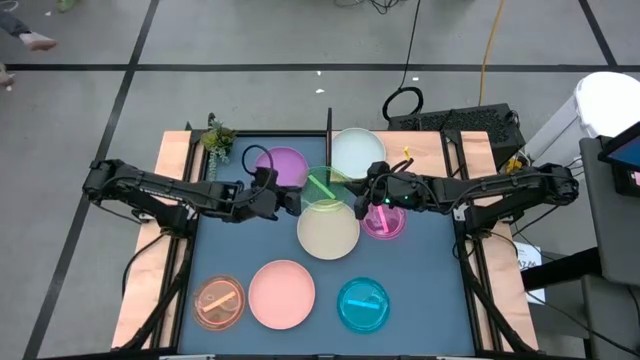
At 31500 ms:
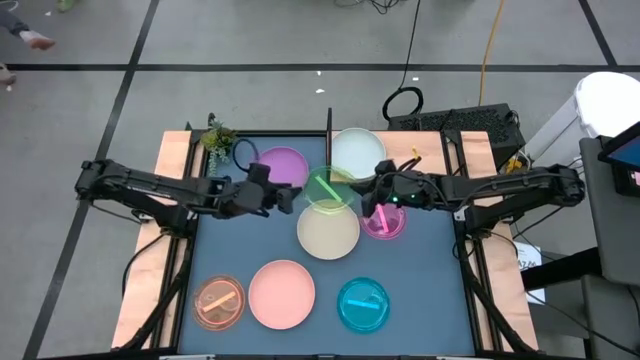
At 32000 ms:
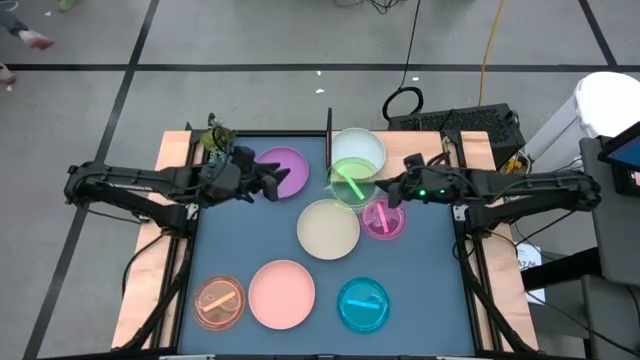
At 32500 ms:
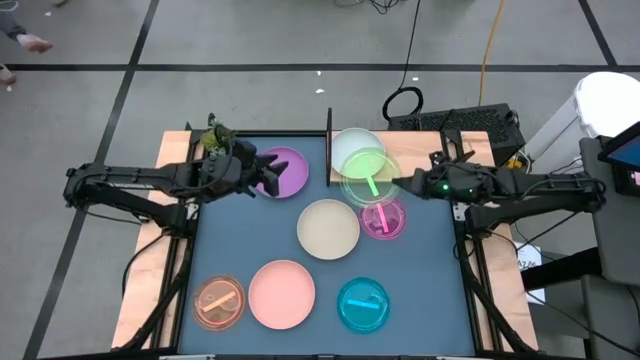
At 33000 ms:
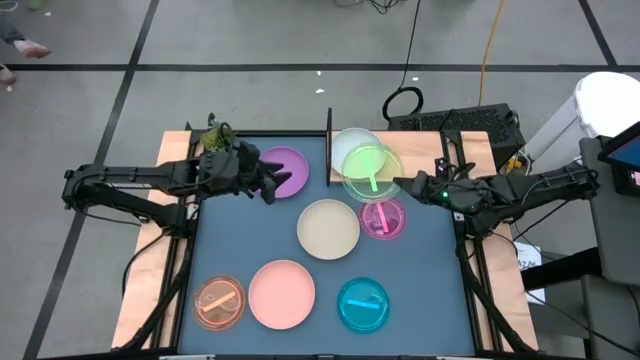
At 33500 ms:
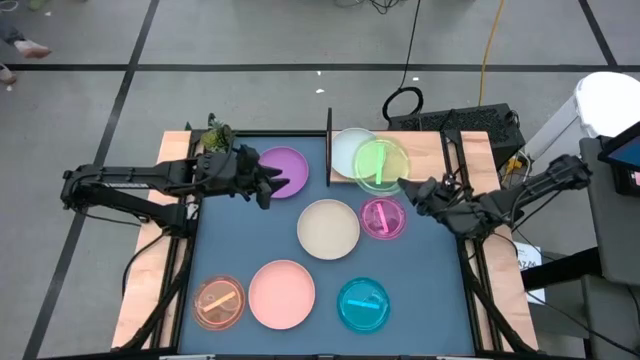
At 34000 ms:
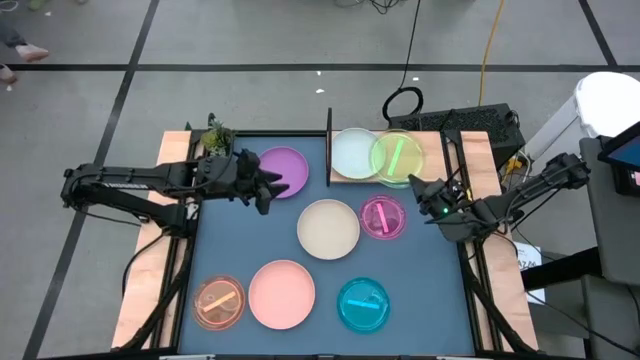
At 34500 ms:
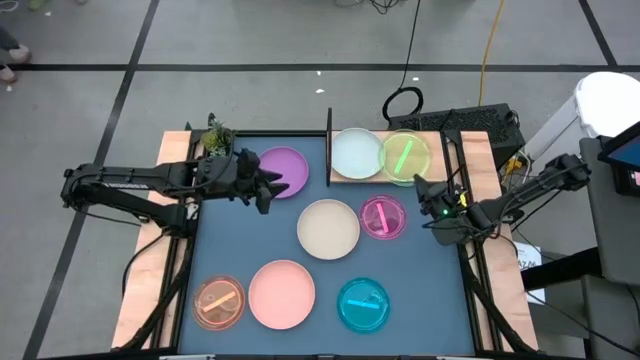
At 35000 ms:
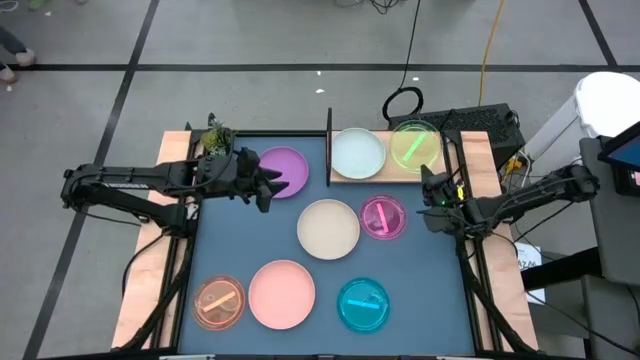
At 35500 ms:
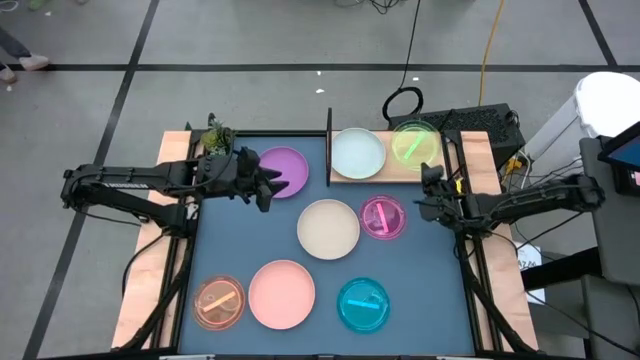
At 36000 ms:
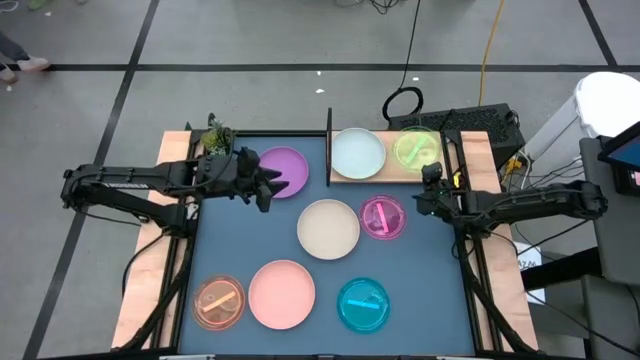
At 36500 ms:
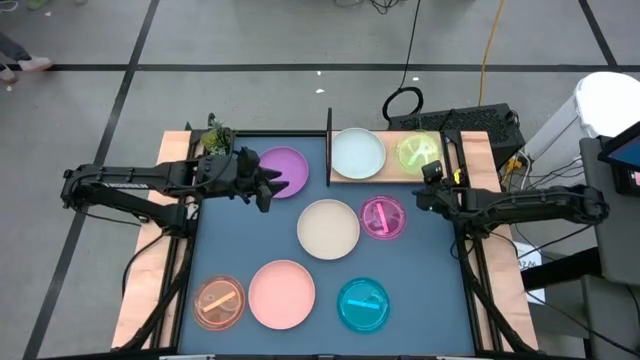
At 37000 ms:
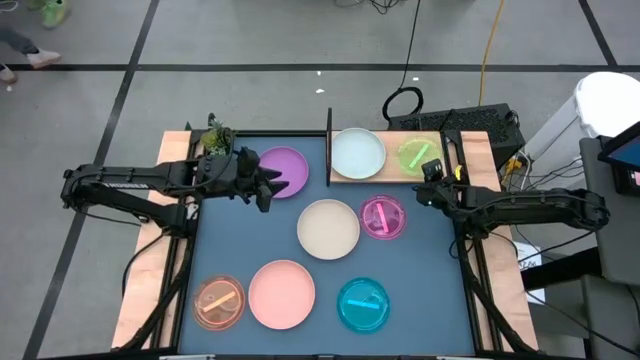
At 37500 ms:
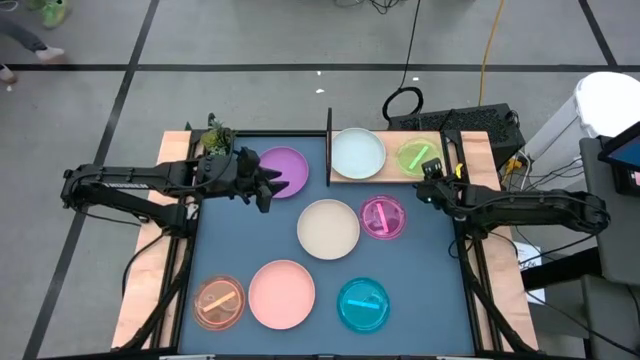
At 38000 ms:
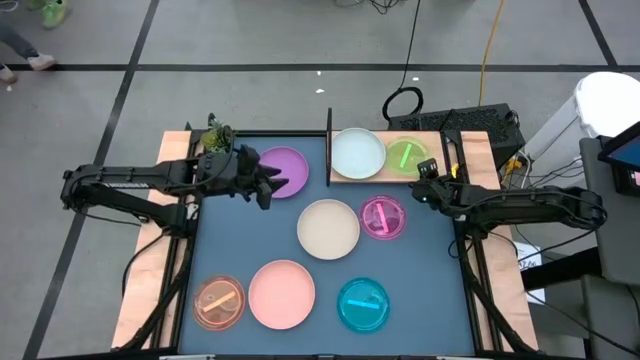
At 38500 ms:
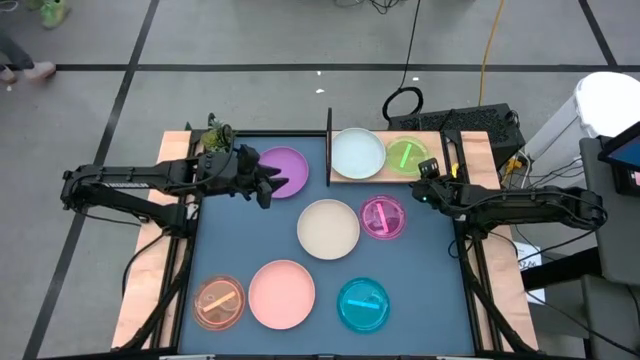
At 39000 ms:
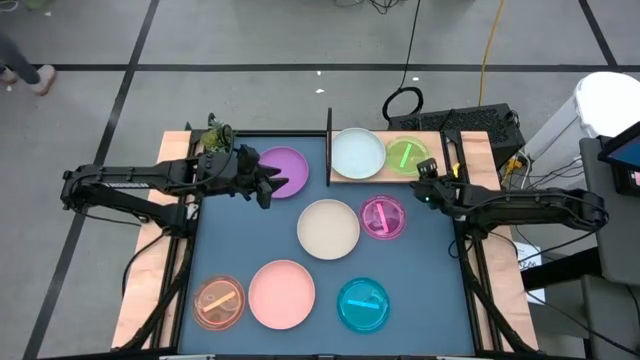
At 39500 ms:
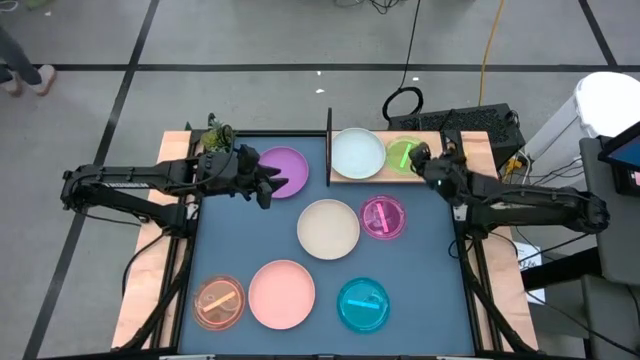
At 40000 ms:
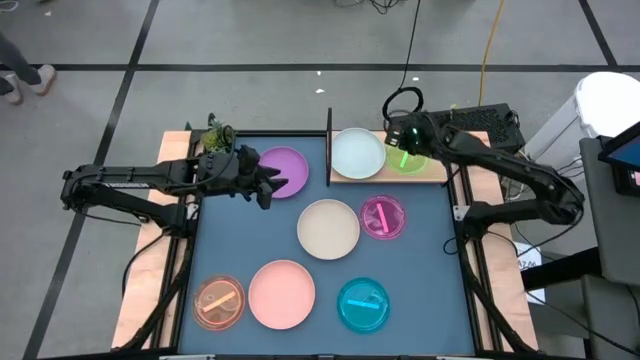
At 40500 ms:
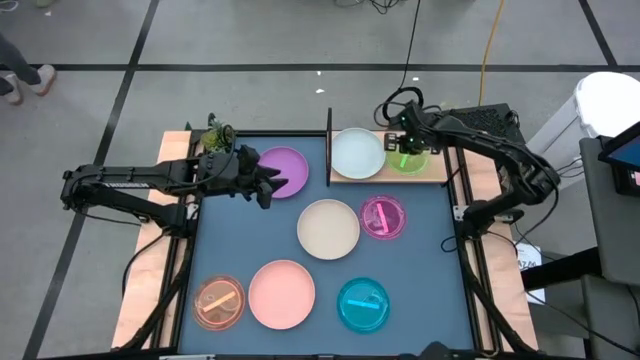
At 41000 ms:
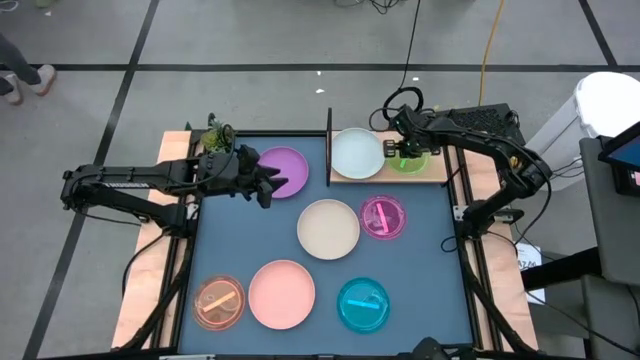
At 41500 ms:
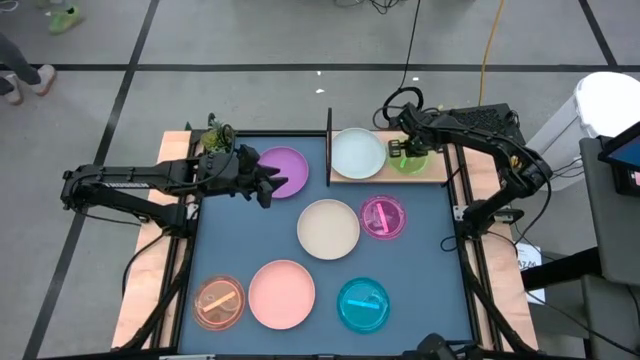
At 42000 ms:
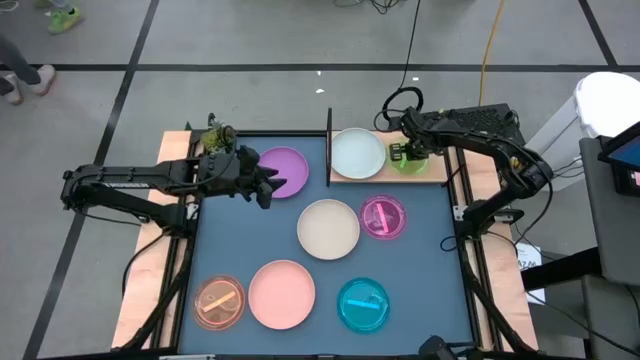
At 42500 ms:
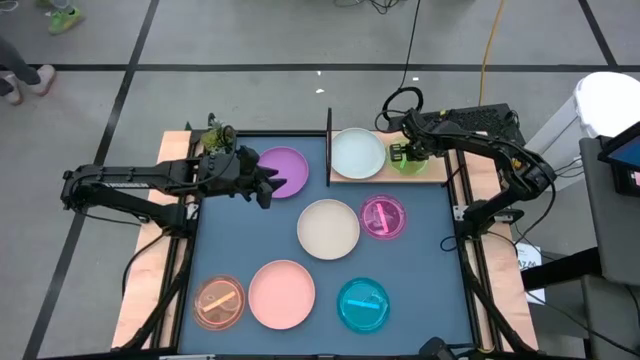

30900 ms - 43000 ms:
Task: Place and stack plates onto a shelf
Put the green plate on the shelf

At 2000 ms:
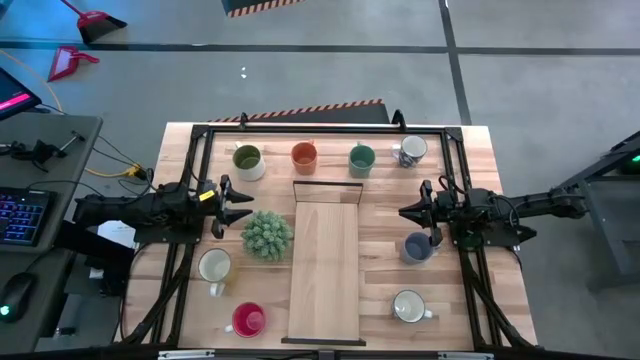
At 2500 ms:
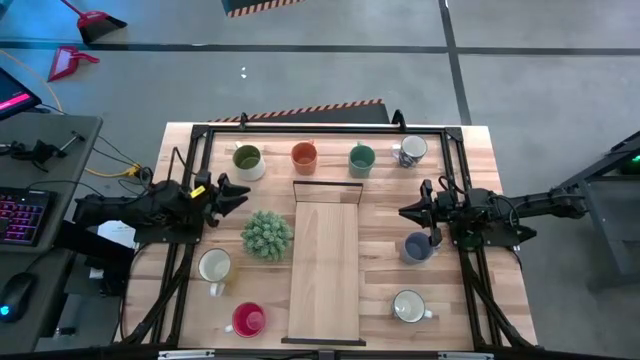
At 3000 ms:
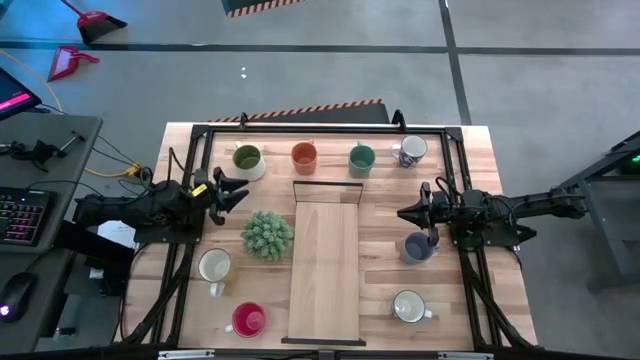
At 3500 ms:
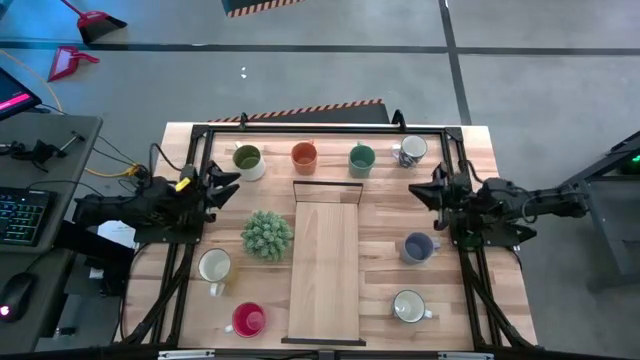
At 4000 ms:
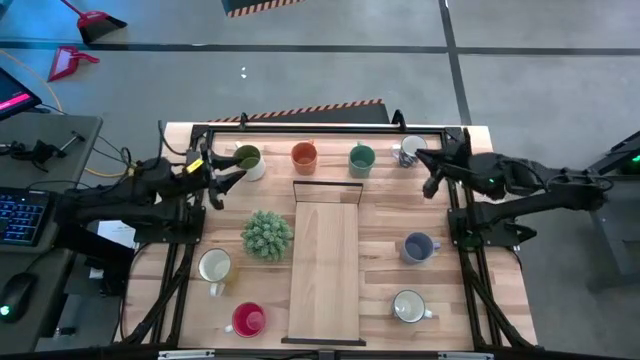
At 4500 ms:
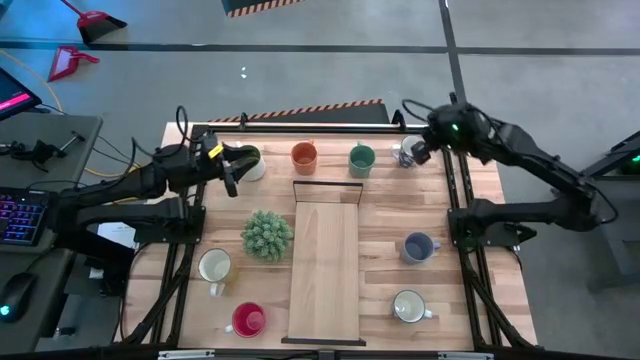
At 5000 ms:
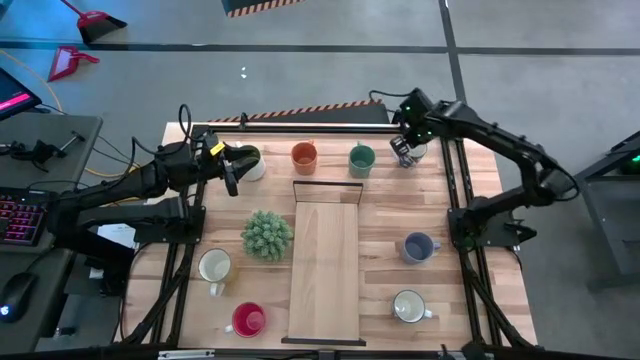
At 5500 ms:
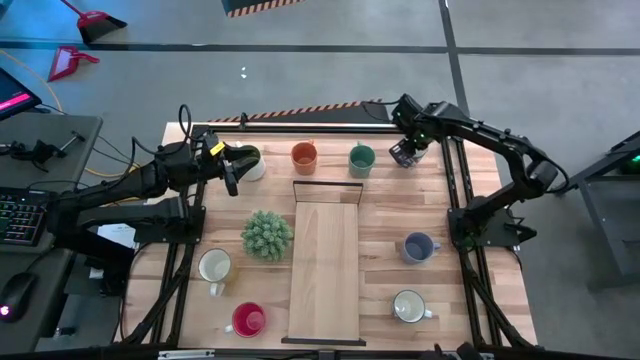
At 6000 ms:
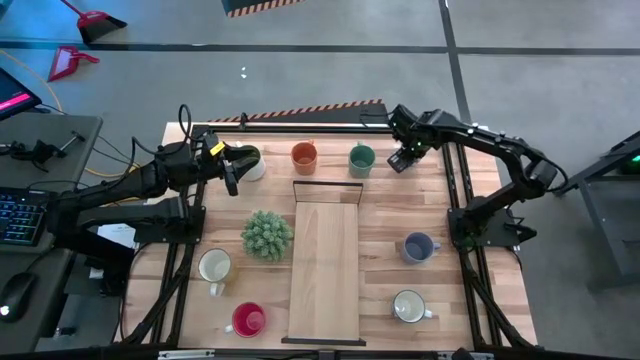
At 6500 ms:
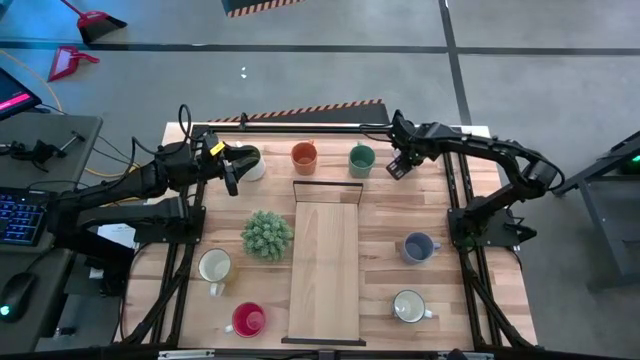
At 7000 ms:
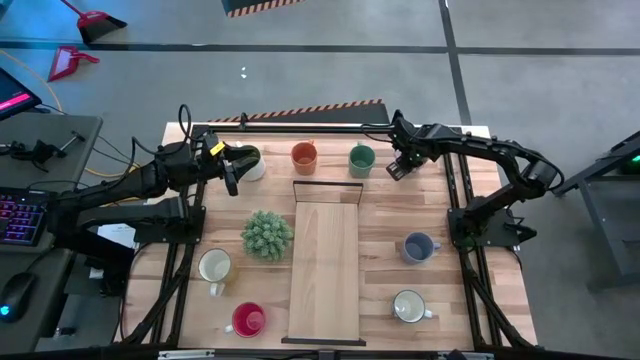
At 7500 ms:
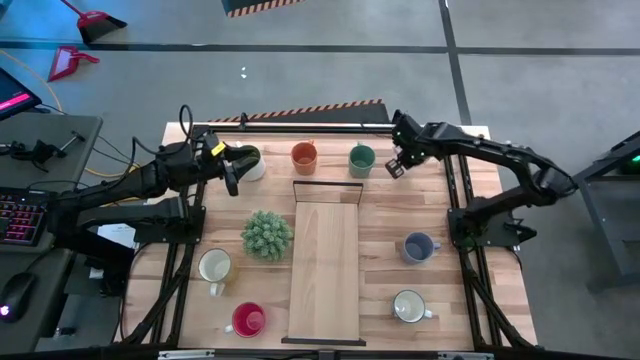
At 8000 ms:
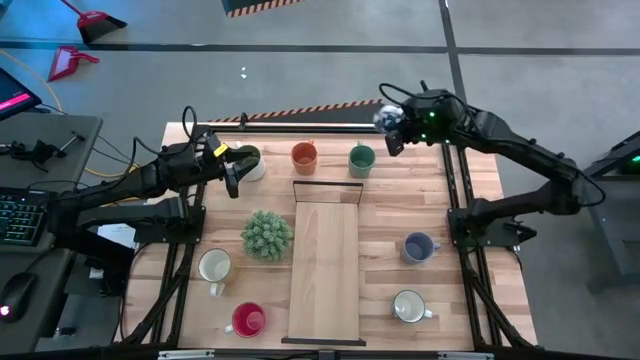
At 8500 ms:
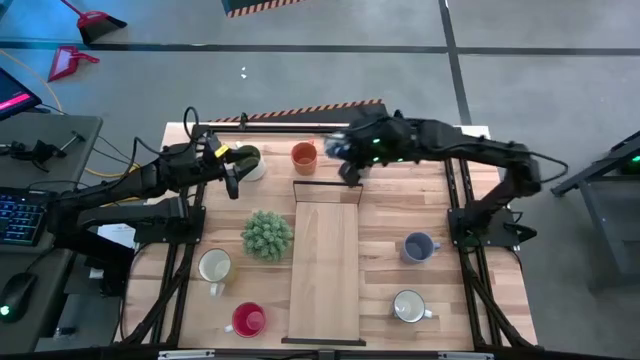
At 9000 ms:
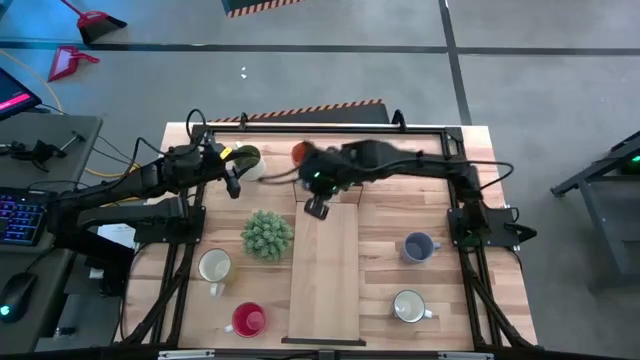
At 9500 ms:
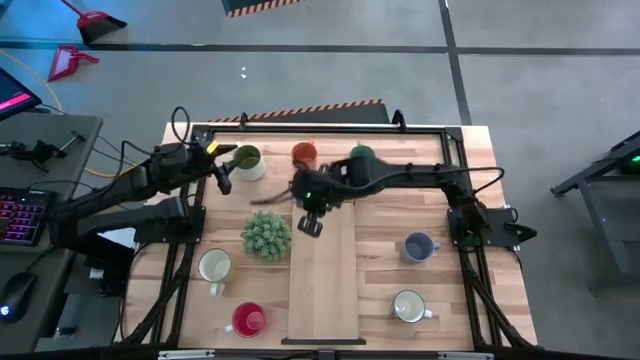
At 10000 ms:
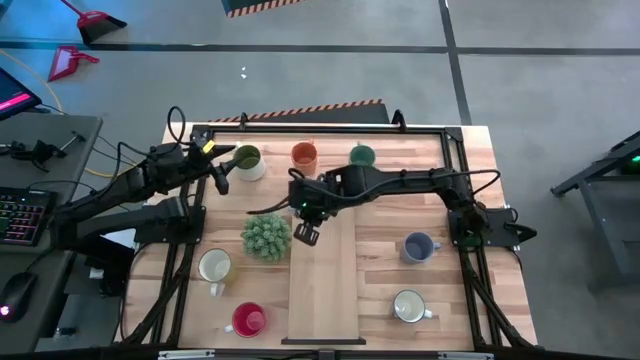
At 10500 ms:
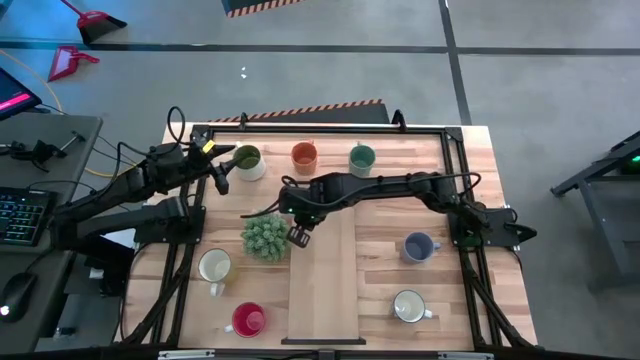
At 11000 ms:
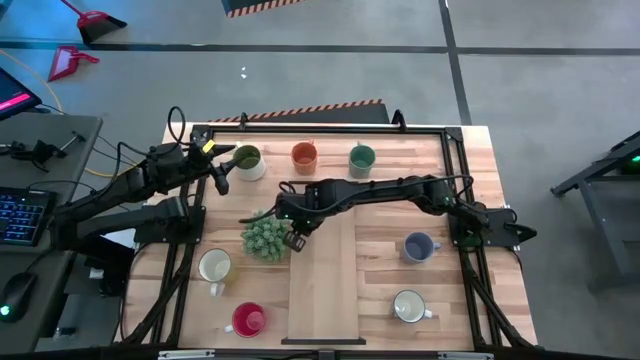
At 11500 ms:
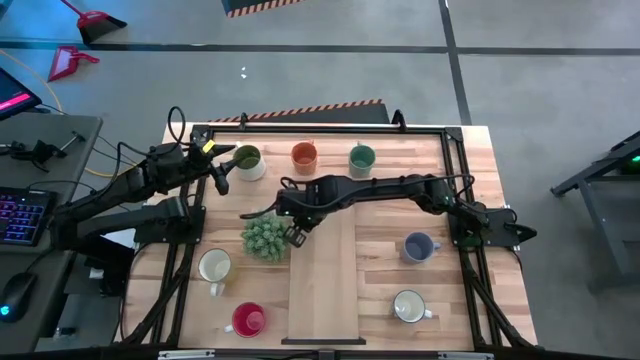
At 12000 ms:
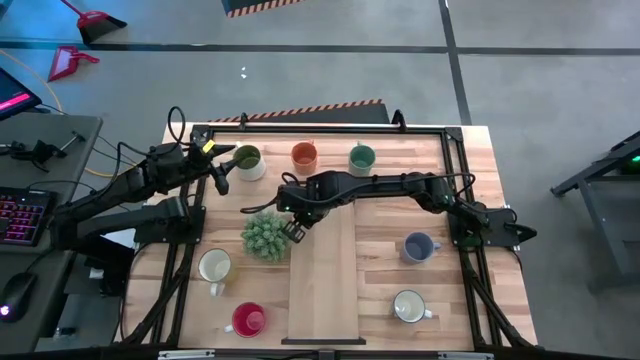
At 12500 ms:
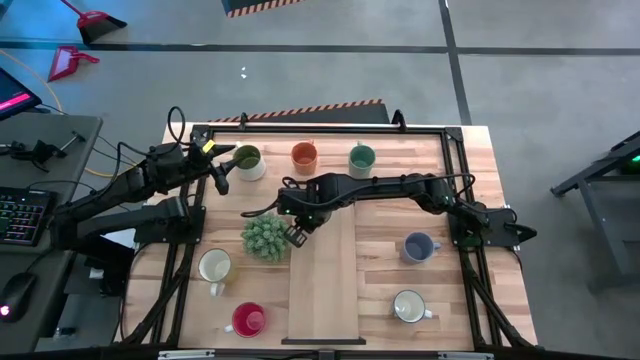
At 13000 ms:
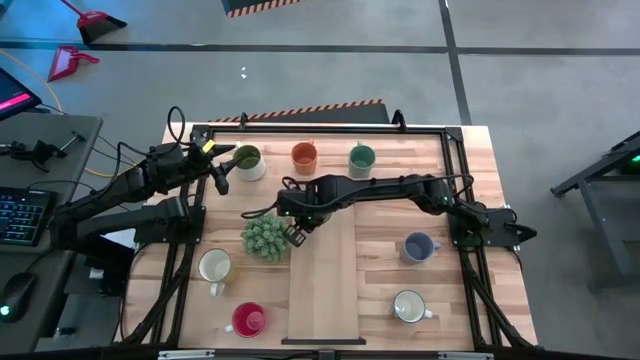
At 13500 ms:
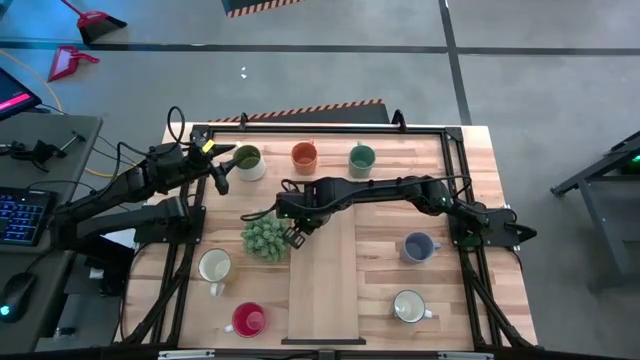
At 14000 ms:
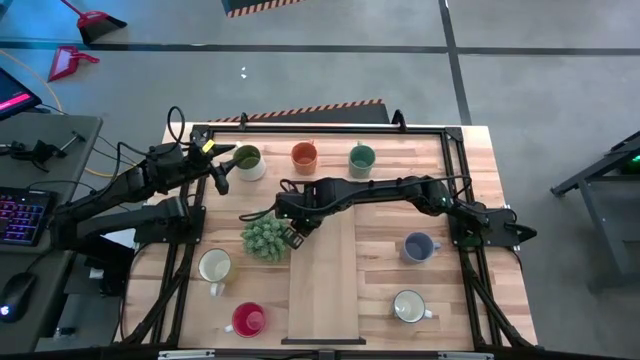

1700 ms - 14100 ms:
Task: Place coffee mugs
Put the top blue patterned mug on the shelf
